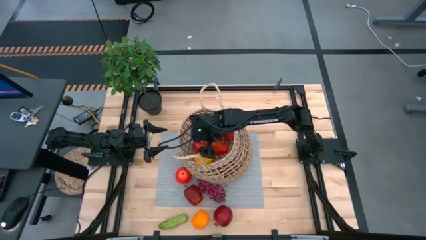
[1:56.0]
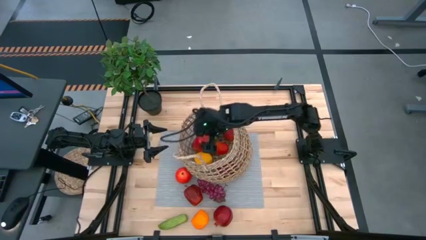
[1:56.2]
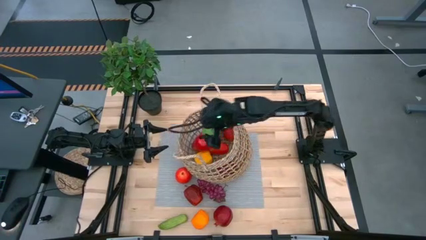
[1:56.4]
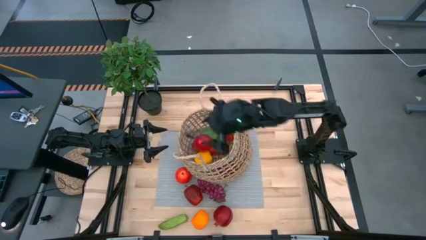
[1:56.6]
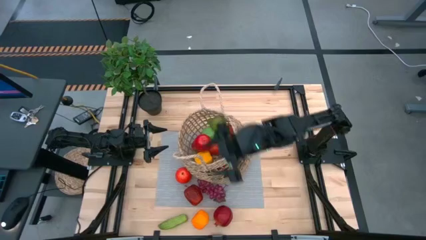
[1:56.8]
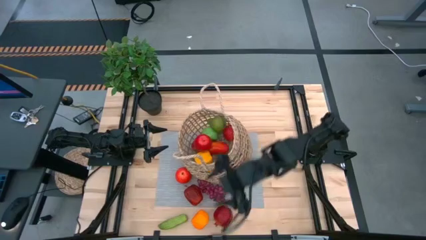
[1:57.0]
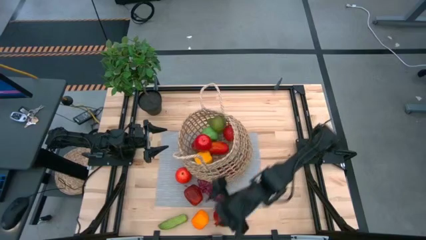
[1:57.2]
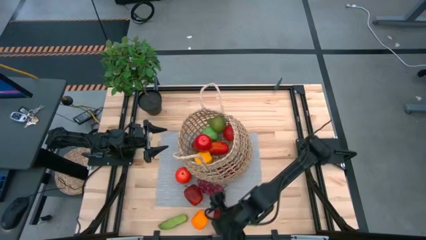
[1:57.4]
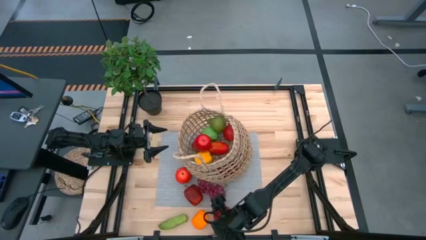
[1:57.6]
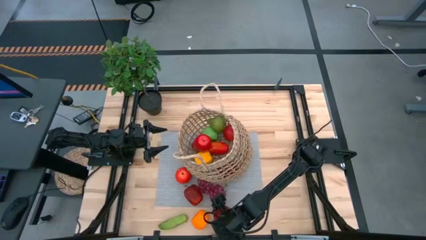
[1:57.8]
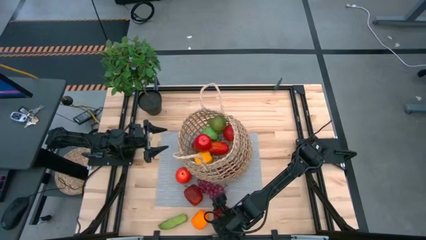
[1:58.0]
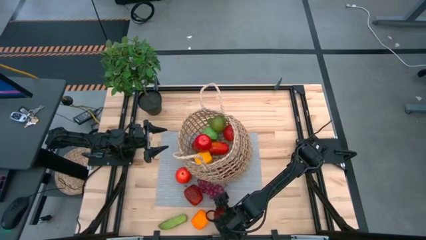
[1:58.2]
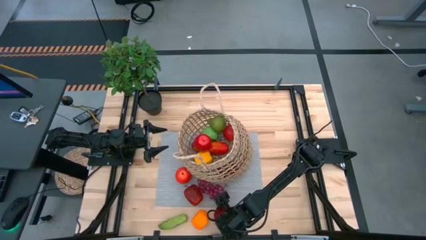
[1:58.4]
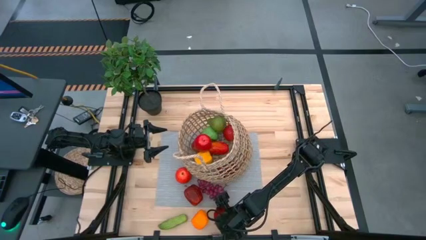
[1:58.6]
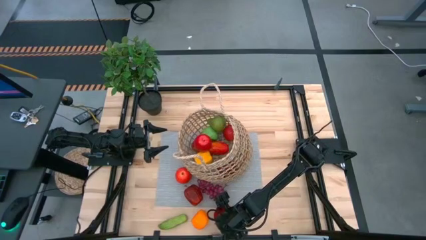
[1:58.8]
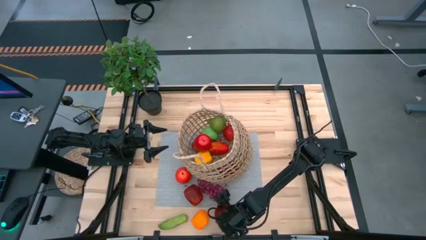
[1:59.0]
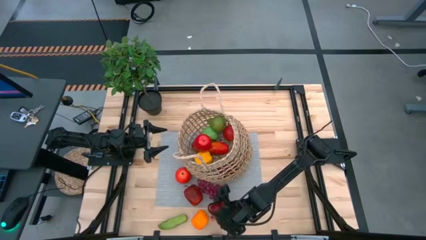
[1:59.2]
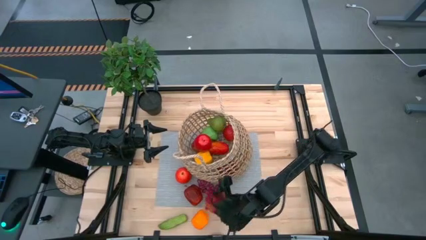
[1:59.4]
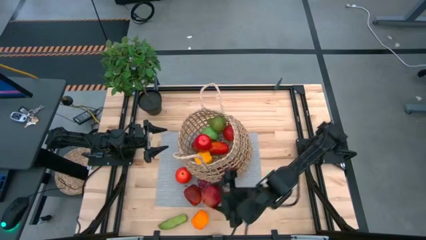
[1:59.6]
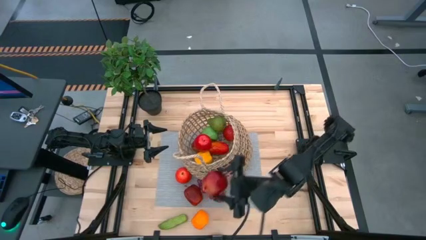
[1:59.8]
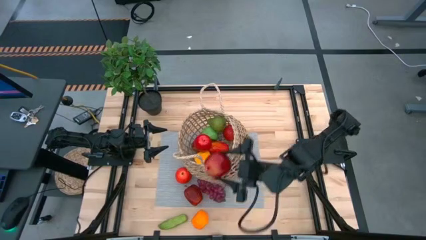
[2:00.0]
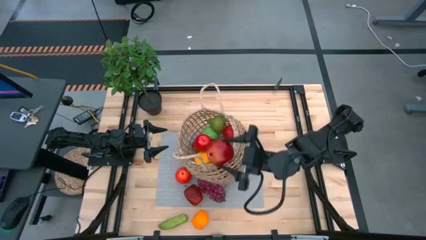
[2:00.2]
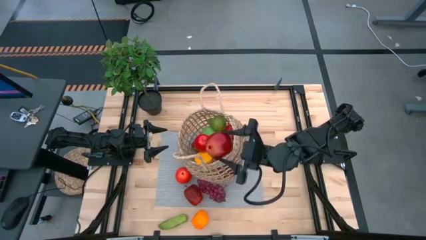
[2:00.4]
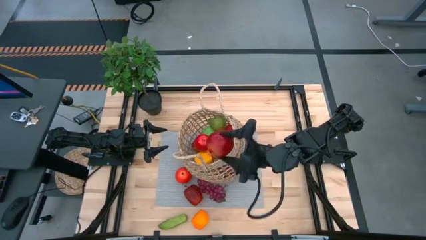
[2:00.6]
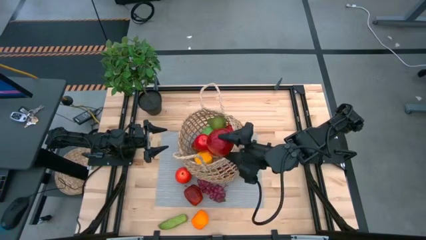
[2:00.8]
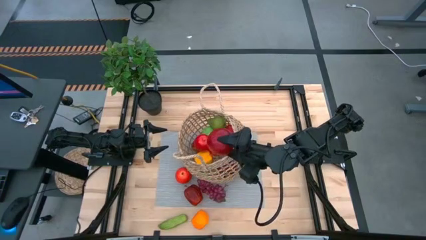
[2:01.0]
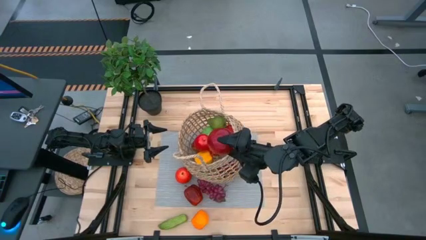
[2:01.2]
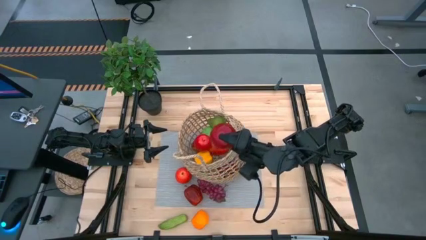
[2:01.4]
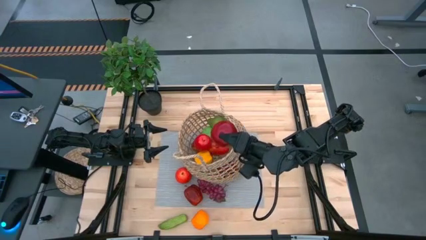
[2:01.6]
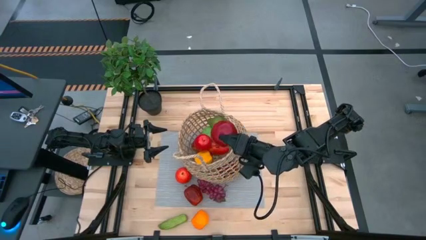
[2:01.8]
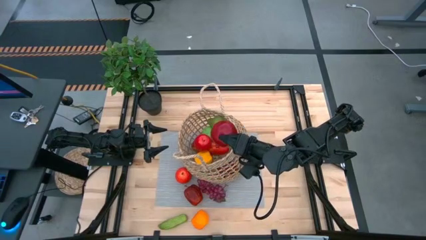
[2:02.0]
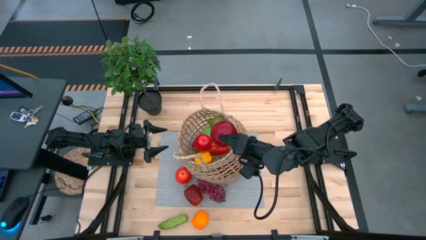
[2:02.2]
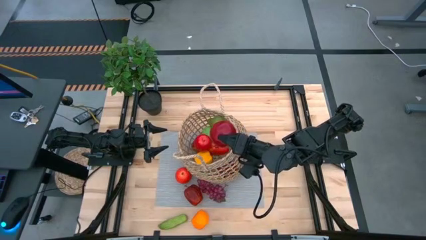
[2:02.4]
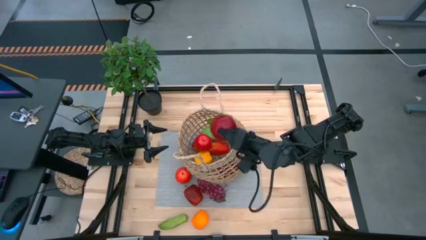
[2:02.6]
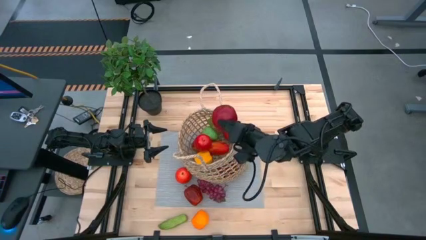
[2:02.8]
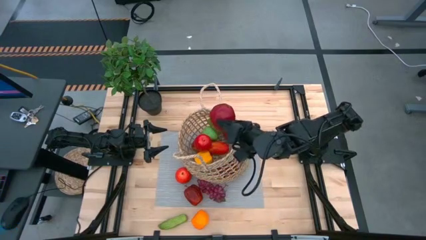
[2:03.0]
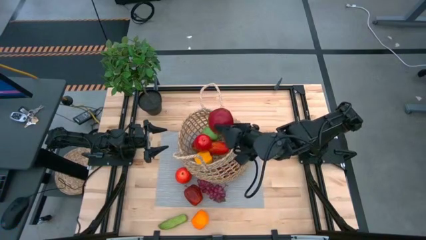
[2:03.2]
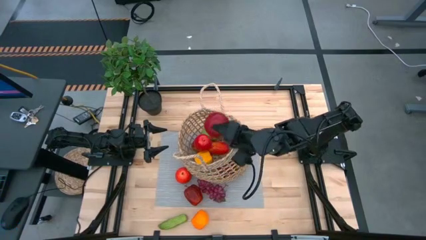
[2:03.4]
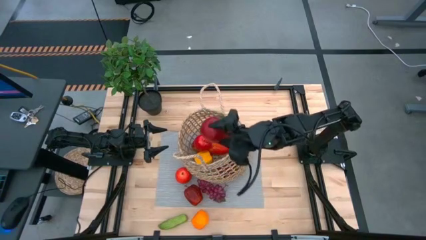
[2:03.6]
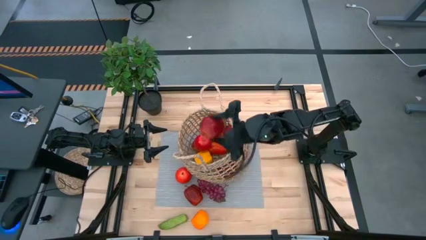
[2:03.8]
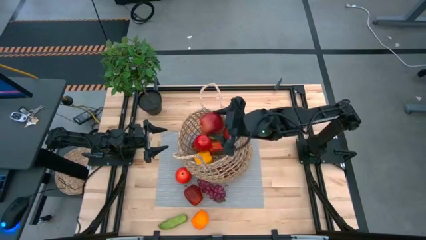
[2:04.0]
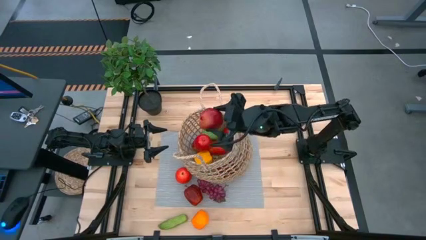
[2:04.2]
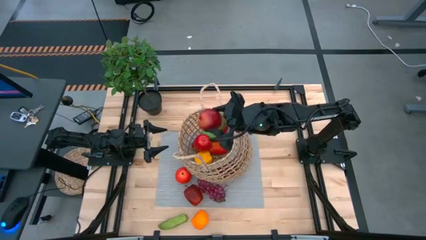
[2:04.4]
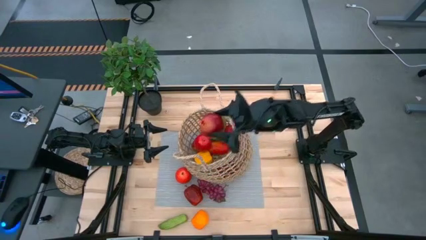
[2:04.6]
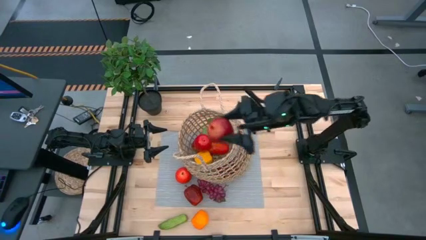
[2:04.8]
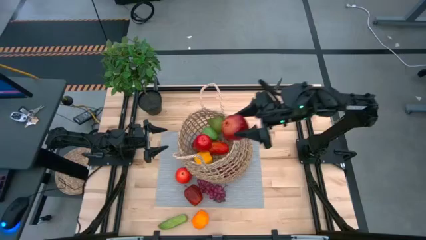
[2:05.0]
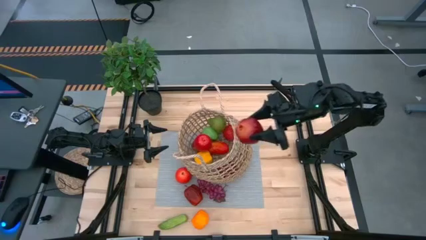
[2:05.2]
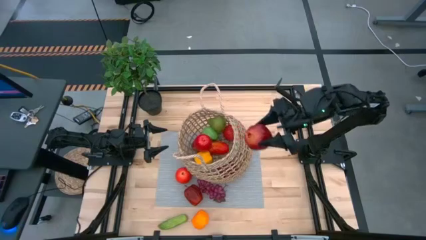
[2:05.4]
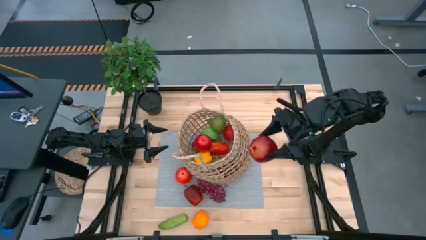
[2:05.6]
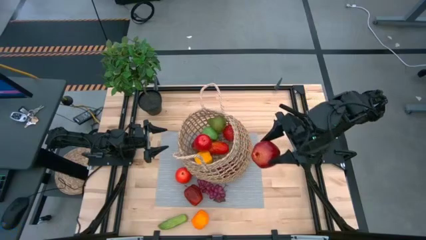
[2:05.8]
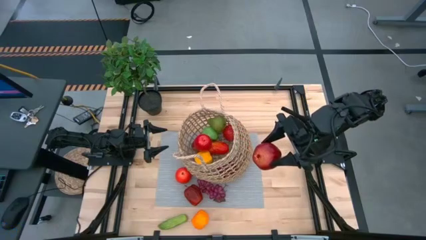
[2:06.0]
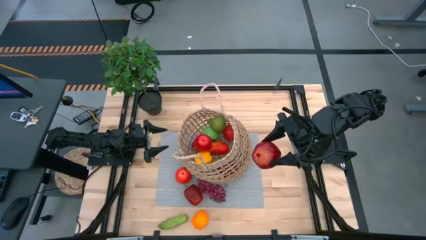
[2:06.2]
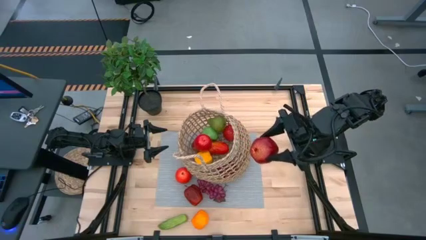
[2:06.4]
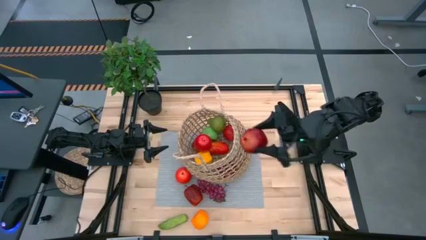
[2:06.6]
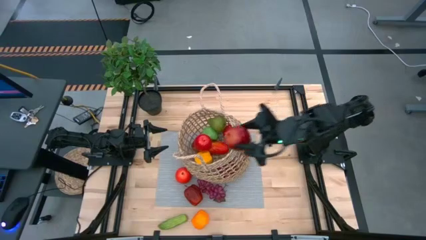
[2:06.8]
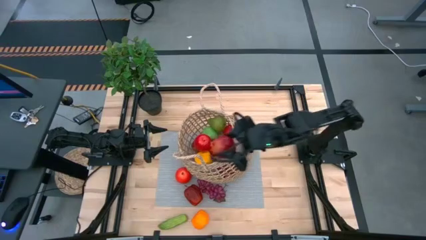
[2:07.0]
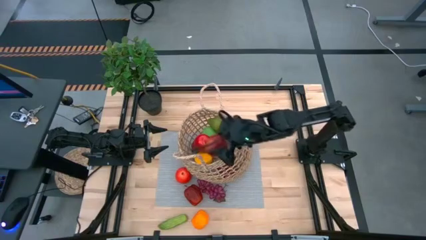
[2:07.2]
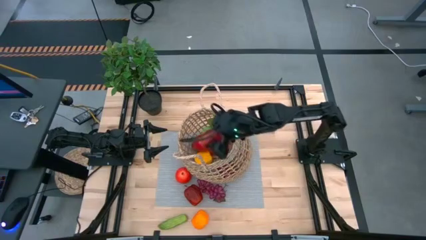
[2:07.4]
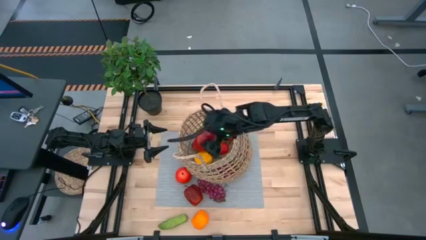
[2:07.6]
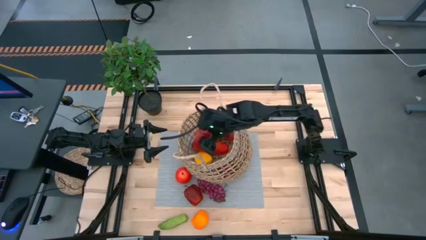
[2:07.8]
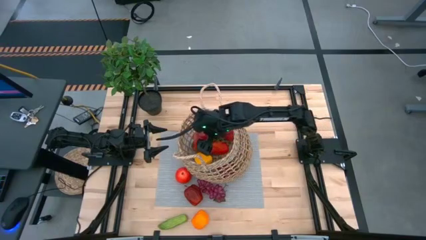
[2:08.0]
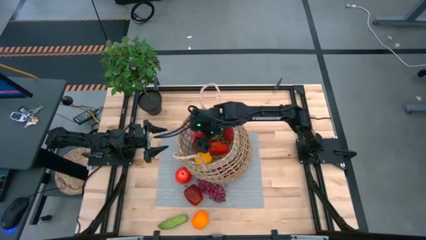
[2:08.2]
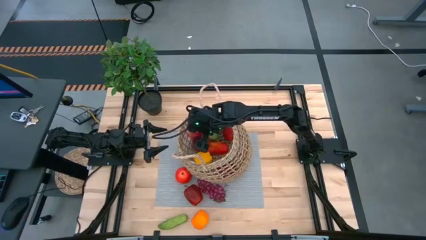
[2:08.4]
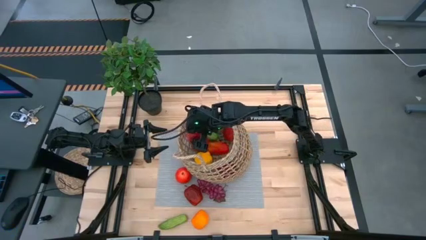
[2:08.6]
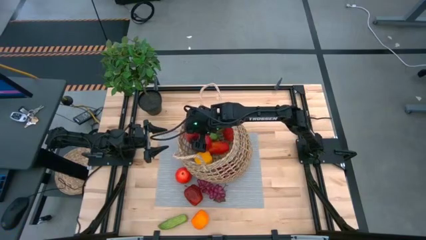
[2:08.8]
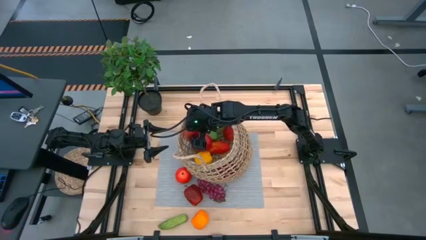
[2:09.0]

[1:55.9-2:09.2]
Task: Build produce basket
Put the pomegranate into the basket

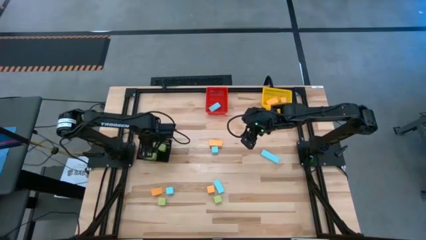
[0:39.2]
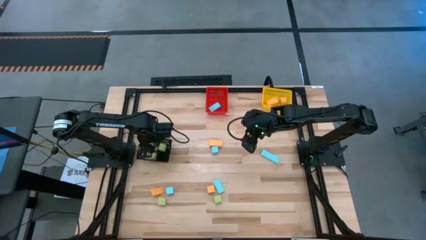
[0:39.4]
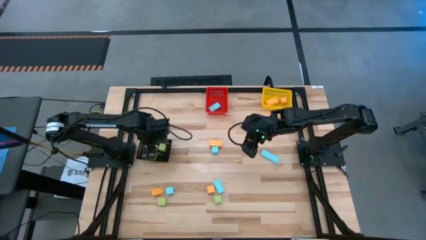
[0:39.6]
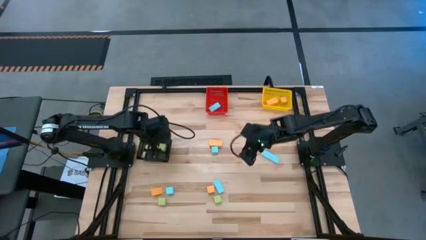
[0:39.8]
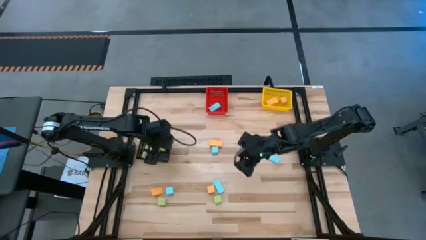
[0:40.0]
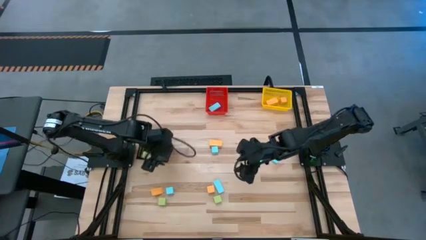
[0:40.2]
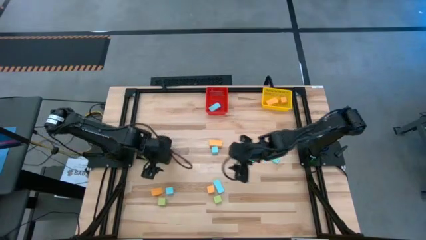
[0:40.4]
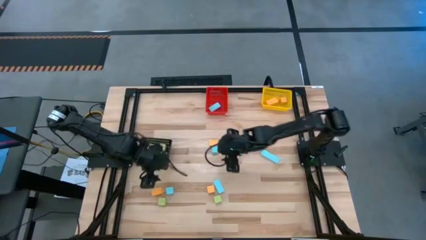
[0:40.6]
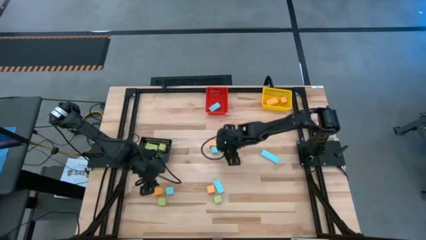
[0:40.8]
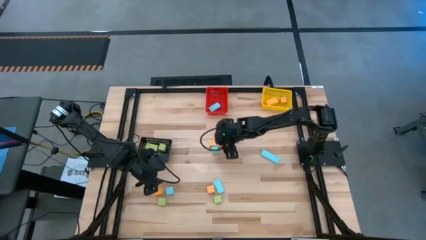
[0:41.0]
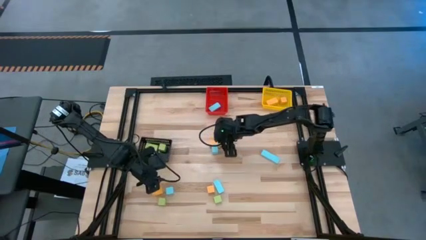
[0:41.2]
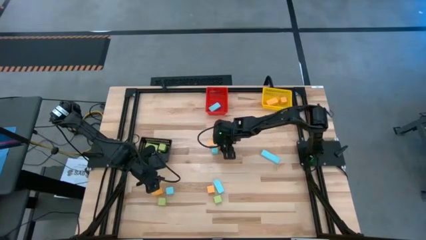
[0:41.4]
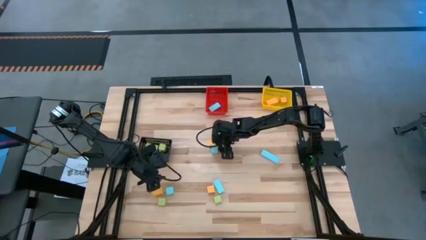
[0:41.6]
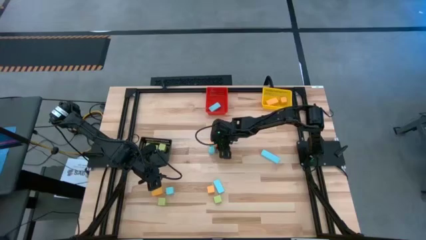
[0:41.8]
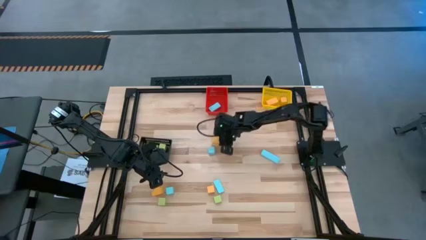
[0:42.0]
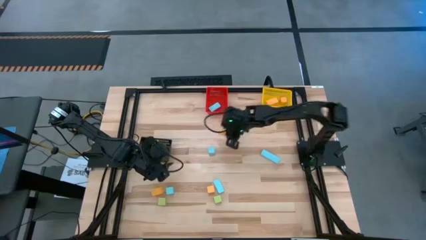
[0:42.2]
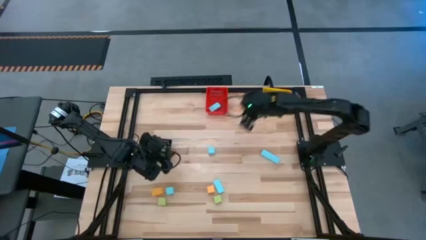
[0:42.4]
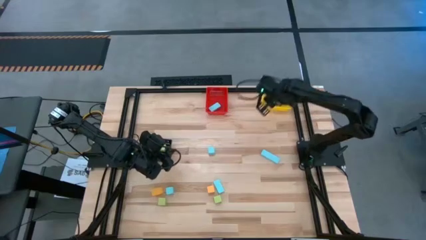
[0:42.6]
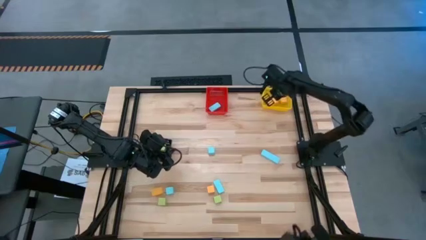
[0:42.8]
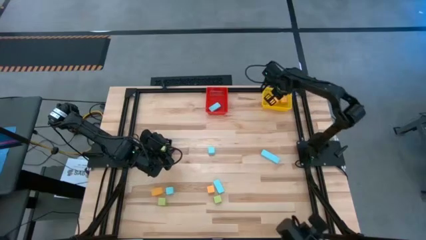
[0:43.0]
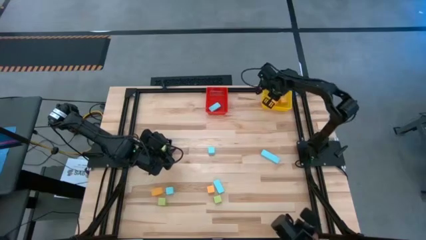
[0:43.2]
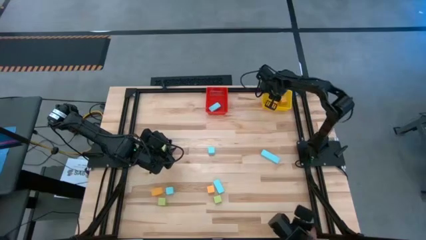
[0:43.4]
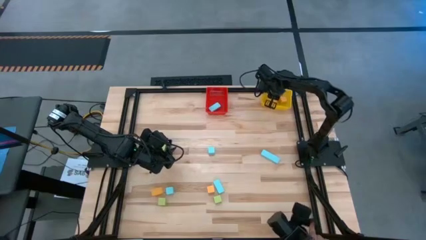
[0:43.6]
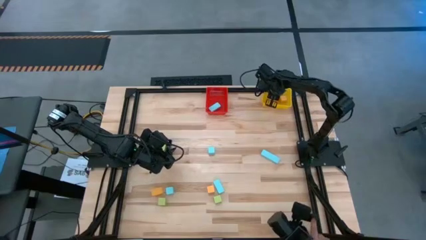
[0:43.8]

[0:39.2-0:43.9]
Task: Sort & place blocks by color
Put the yellow block into the yellow bin
